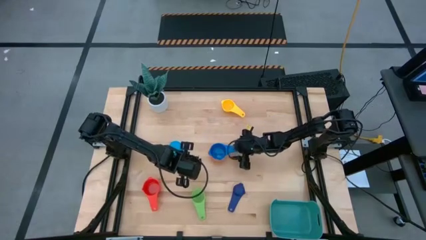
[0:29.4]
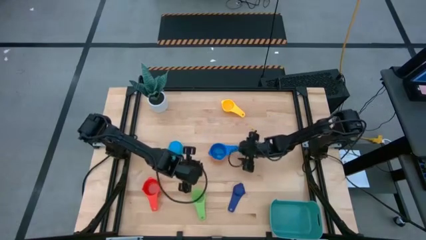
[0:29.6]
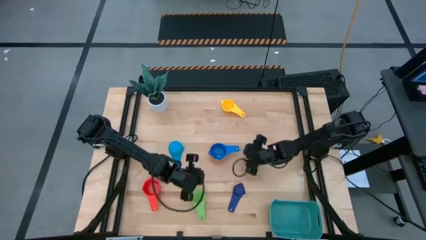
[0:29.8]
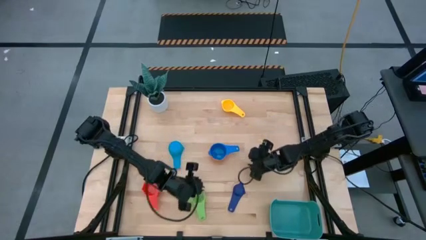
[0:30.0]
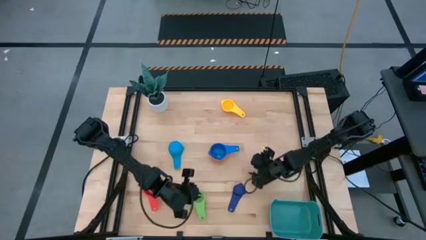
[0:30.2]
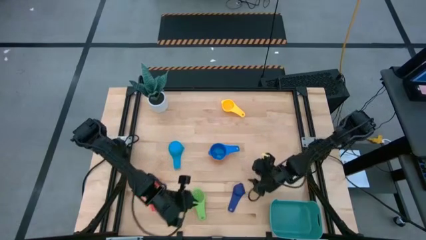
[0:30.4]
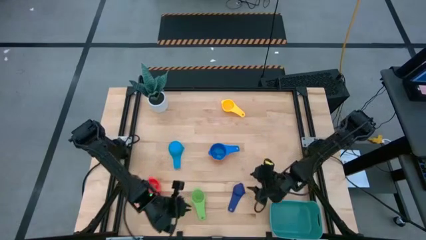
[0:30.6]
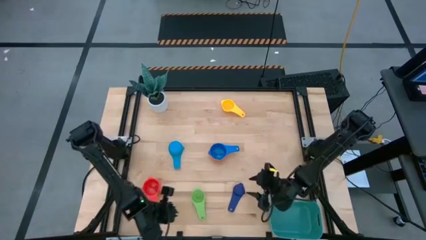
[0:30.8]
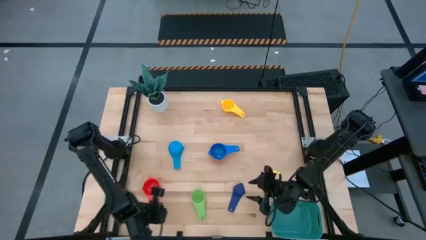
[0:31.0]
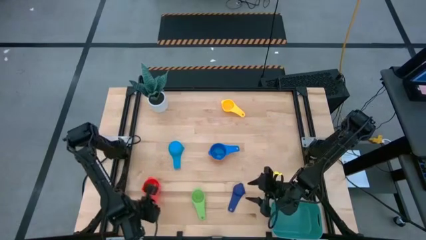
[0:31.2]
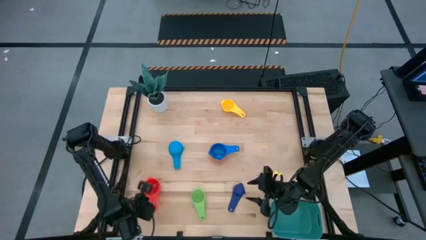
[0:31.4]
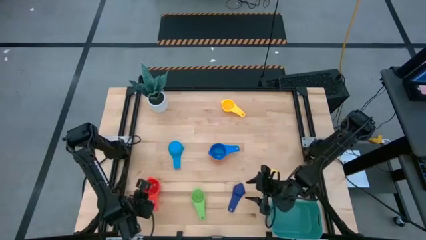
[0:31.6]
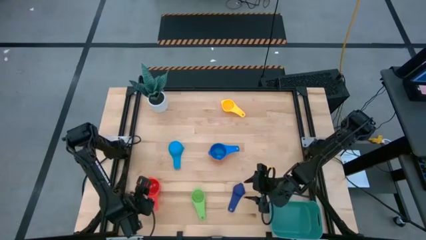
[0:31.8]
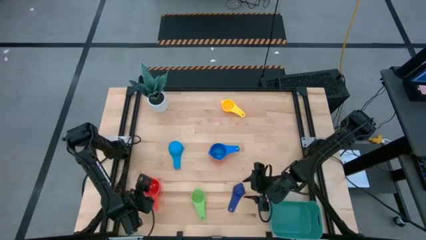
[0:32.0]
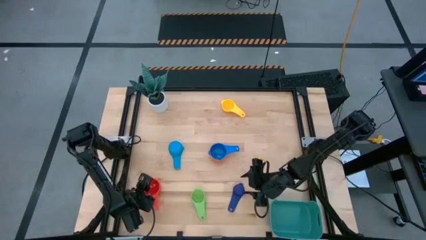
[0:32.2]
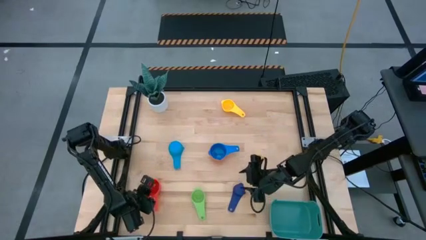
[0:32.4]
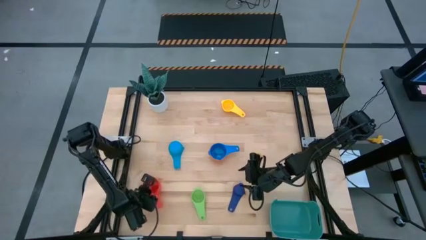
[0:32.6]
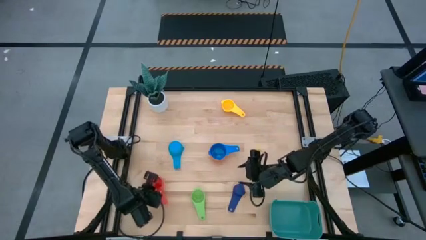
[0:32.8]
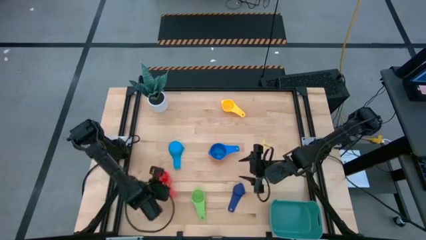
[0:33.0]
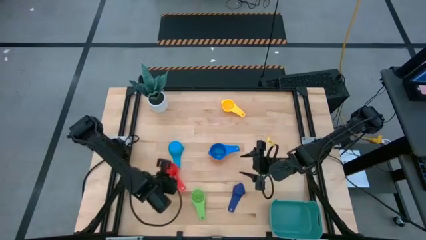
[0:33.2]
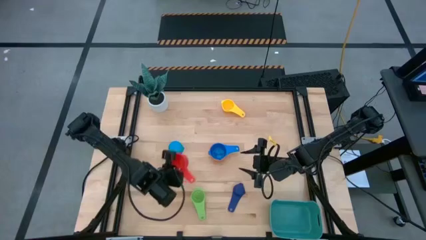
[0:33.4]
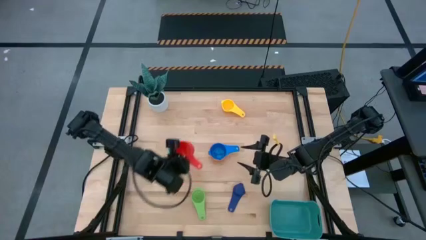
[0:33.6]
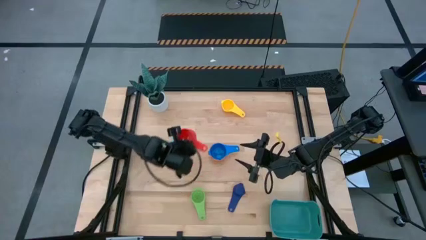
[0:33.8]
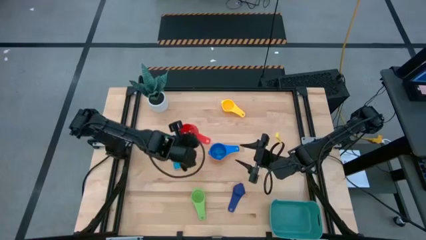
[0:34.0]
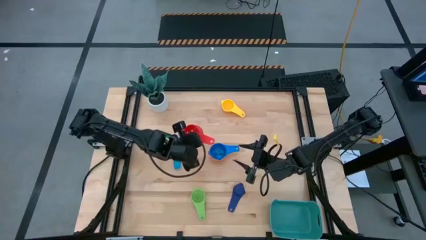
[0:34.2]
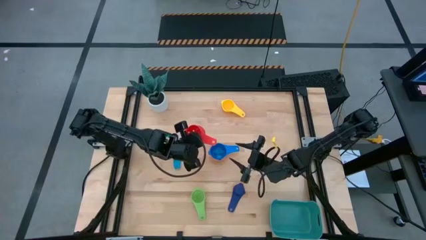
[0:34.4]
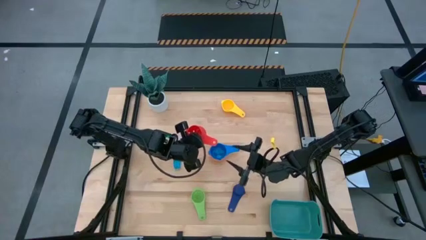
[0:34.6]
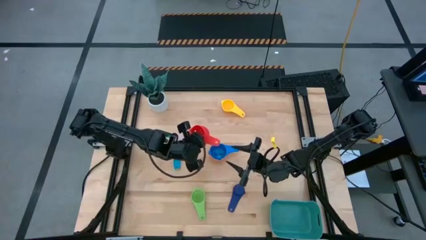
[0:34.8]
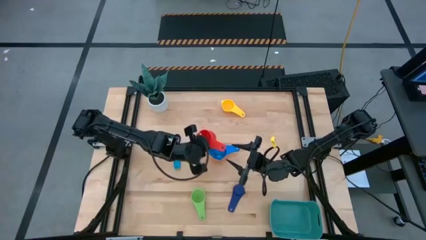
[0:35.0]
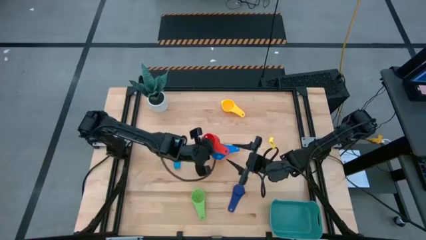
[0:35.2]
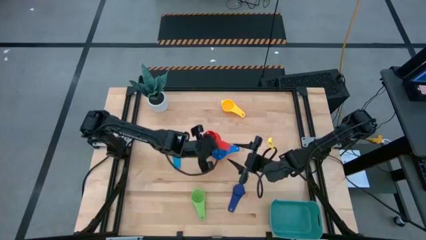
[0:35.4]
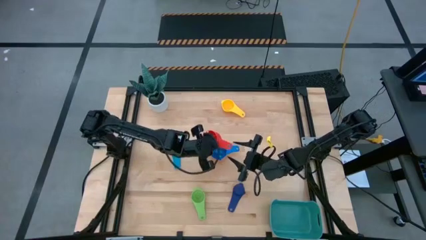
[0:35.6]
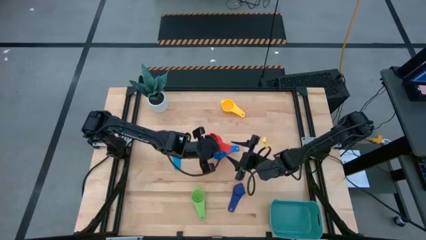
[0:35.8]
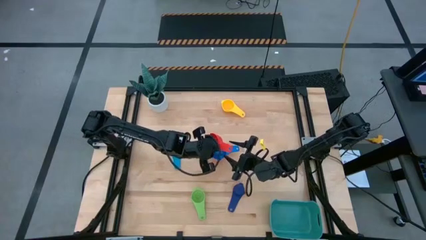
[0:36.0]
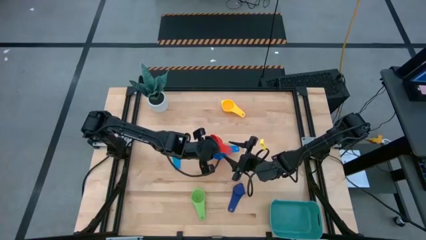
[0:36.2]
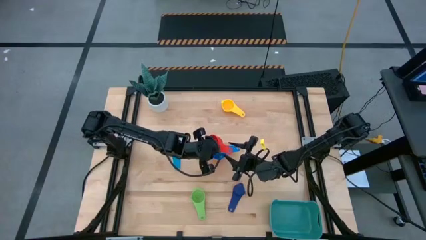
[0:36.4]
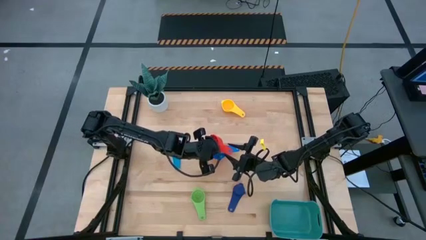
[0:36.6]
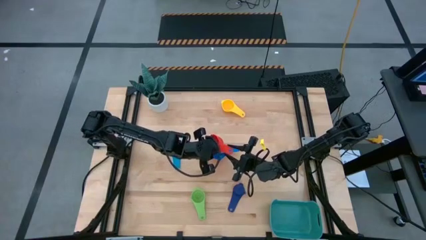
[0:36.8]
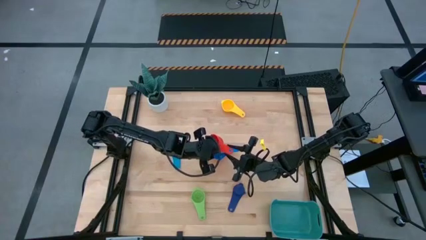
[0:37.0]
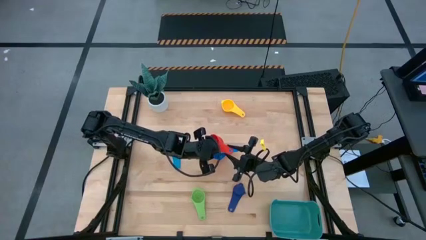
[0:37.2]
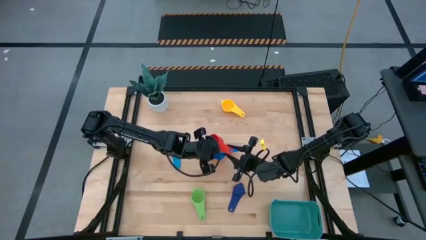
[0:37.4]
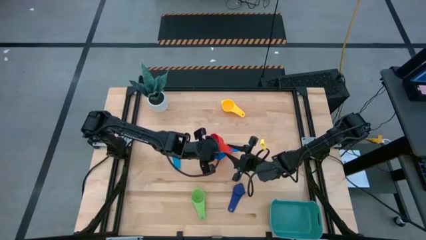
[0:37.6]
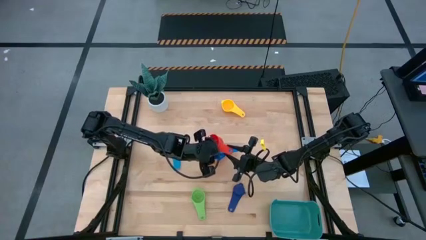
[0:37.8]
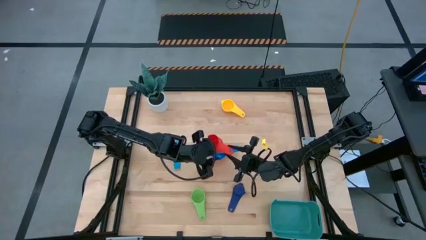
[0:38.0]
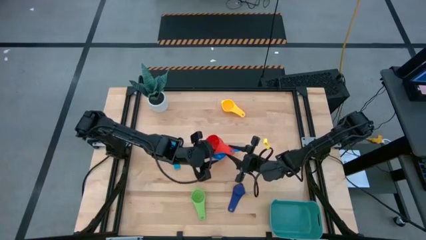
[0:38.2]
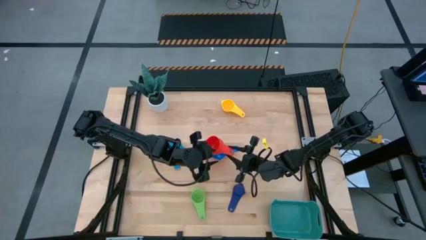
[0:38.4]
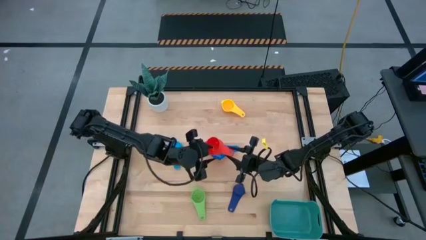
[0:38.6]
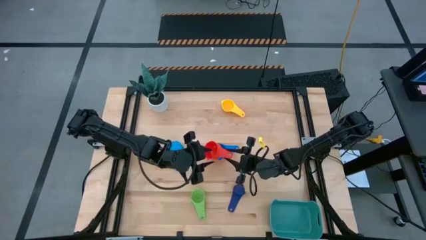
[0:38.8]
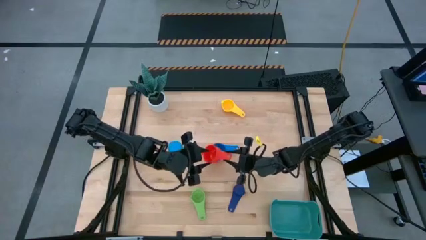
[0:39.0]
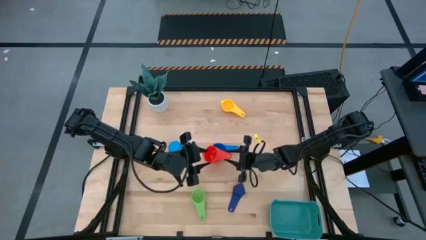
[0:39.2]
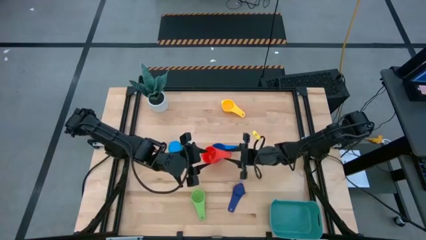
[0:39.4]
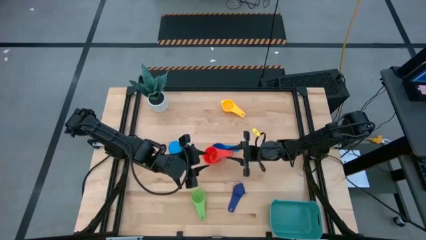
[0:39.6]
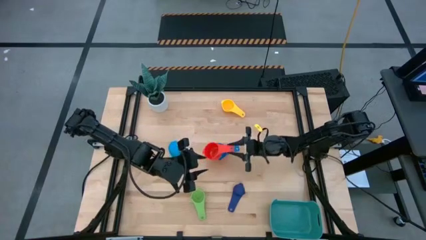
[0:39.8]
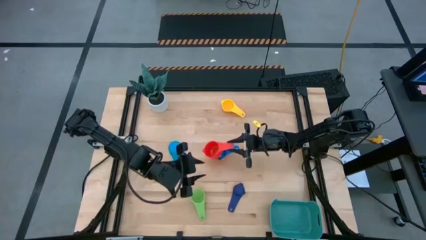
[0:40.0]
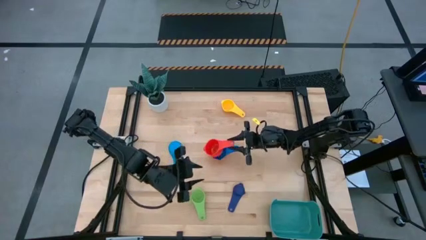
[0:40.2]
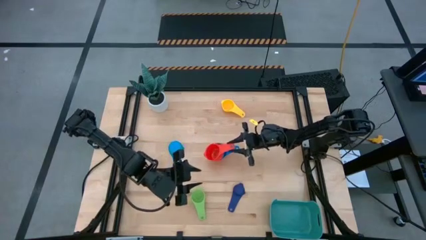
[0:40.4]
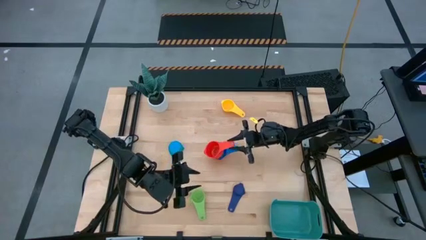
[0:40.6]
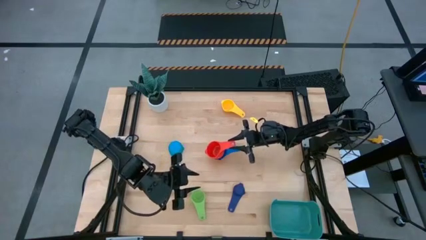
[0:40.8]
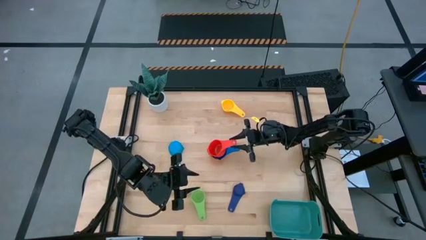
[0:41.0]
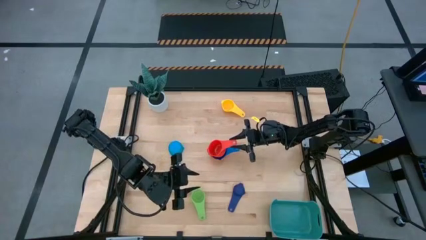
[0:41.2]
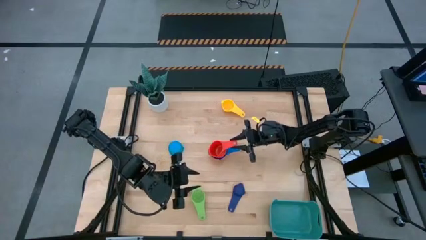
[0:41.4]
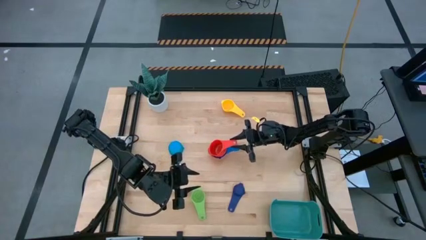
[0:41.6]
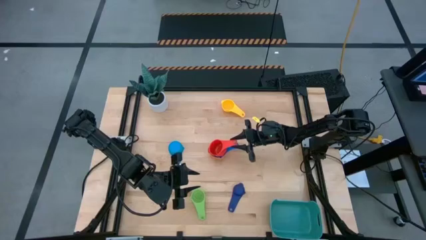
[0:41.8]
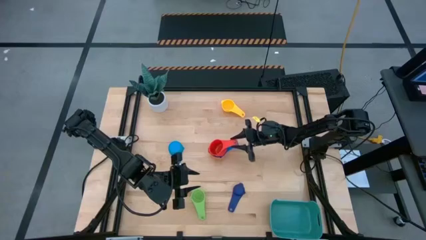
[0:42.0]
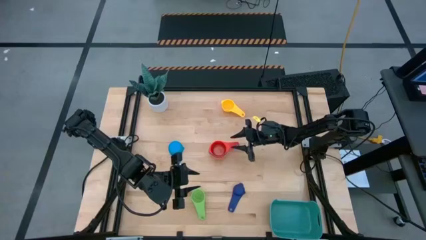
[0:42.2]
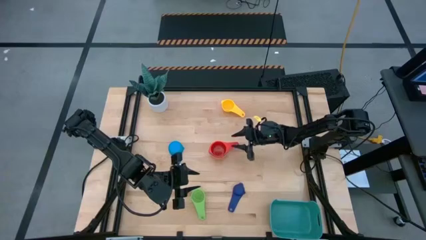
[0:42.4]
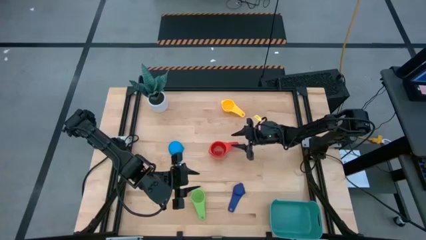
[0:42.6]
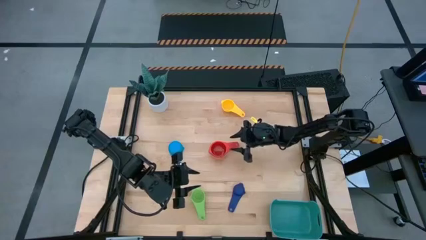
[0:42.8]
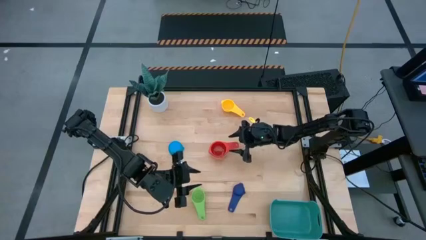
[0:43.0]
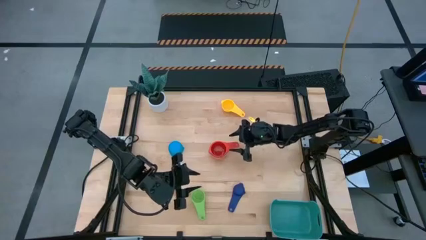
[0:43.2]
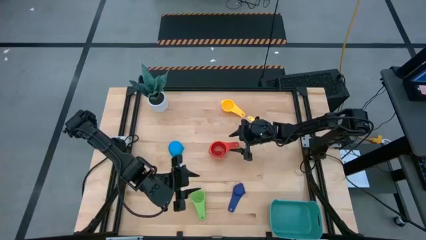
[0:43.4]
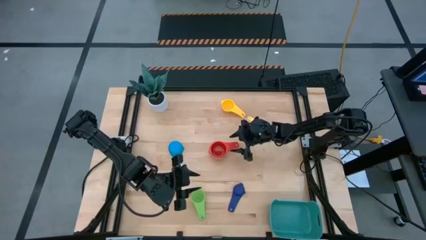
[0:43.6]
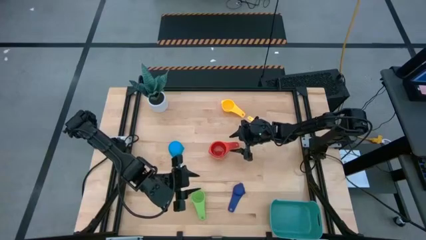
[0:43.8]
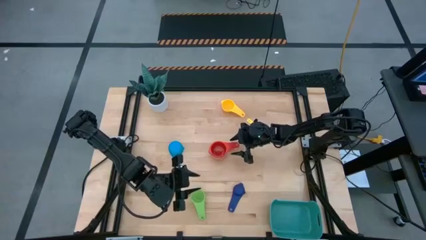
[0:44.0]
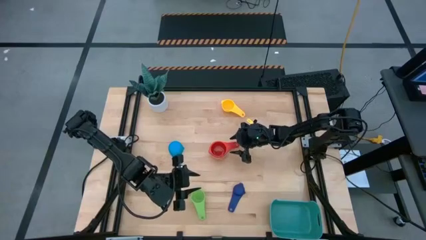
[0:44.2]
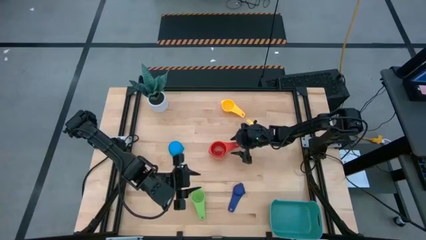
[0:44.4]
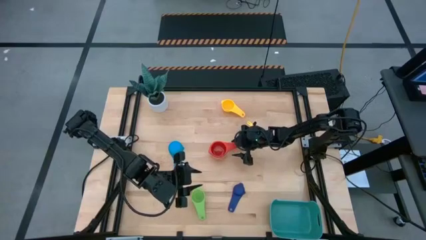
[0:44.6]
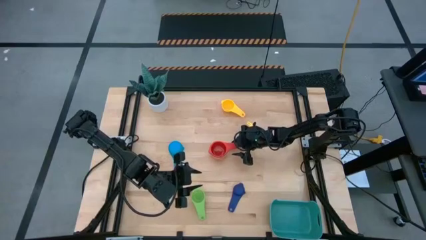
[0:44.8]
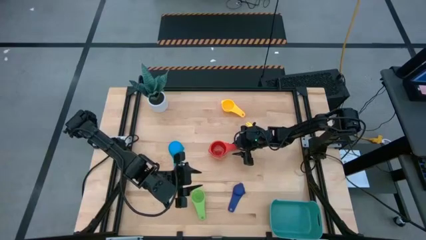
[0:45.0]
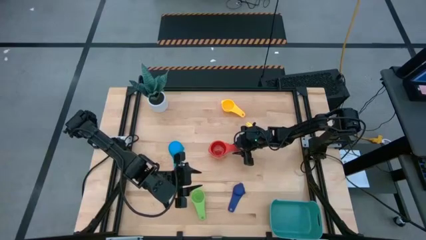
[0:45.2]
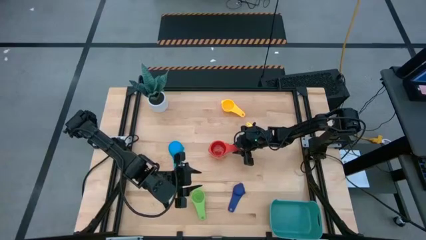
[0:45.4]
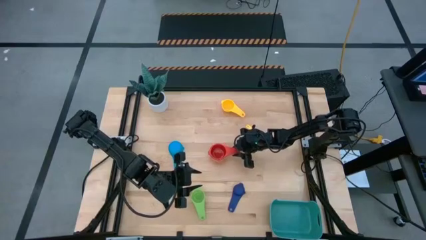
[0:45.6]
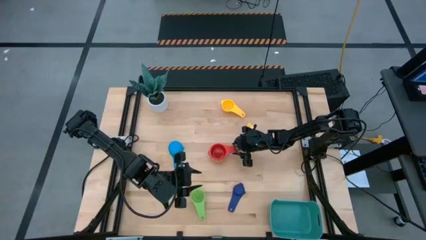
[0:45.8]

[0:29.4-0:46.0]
Task: Nest measuring cups in basket
Stack the orange measuring cup on top of the blue measuring cup
